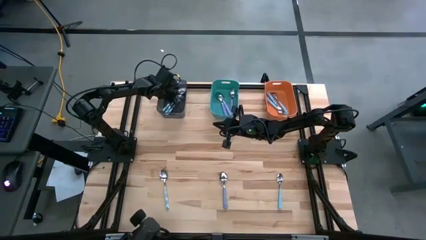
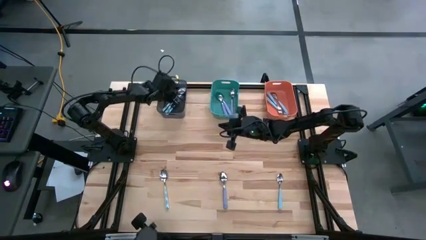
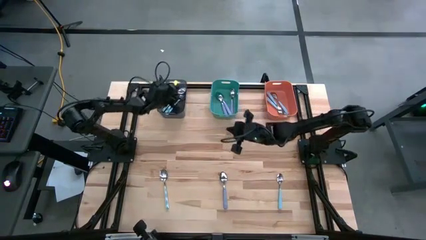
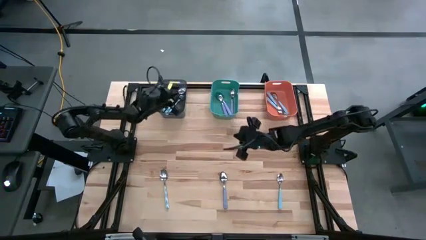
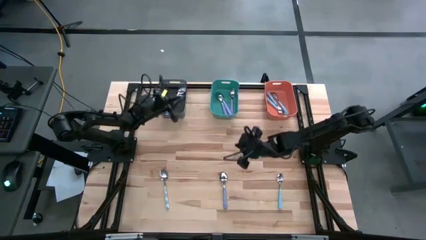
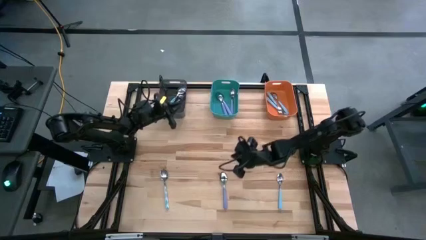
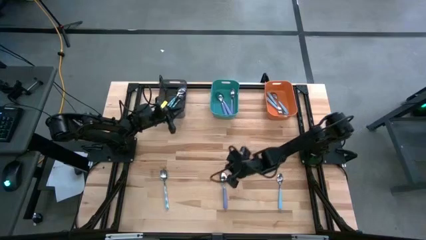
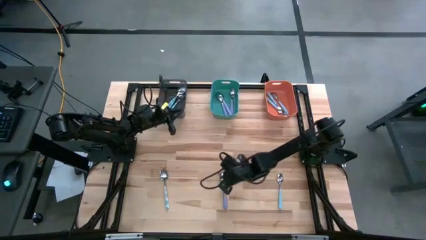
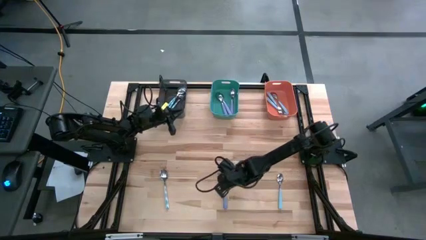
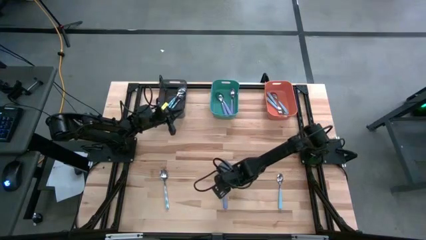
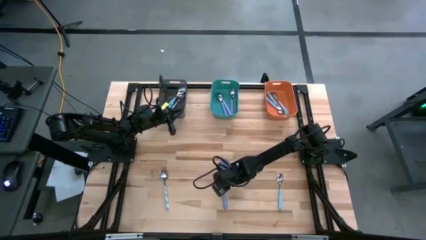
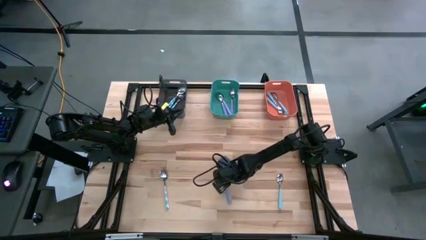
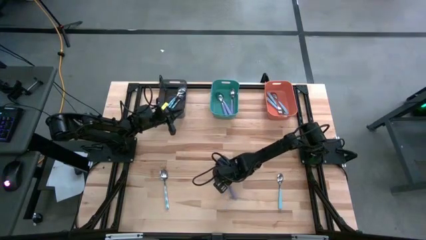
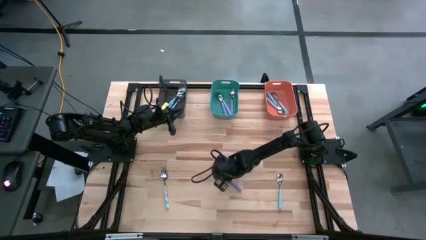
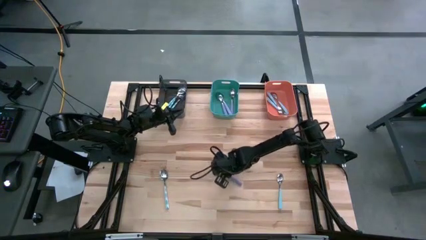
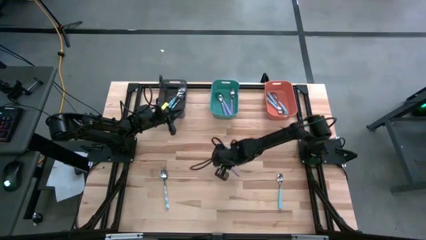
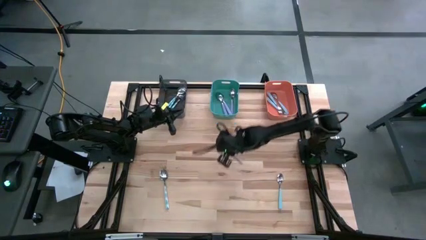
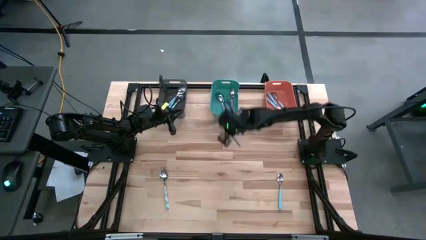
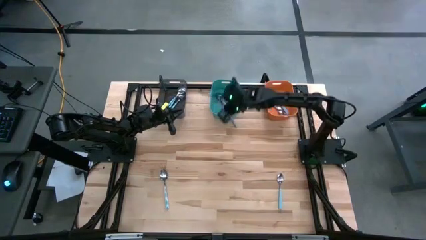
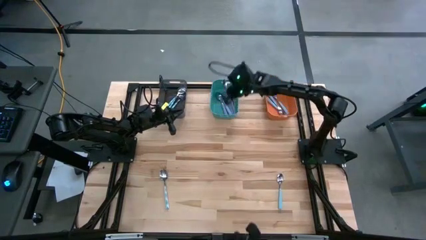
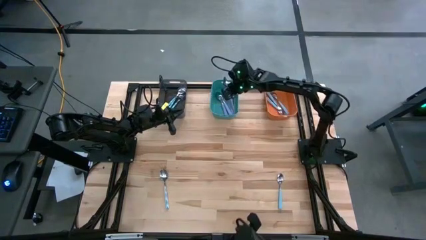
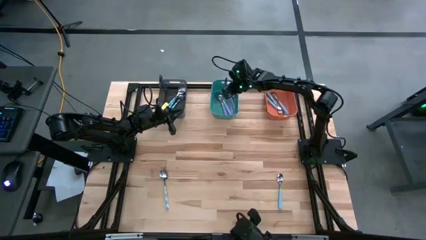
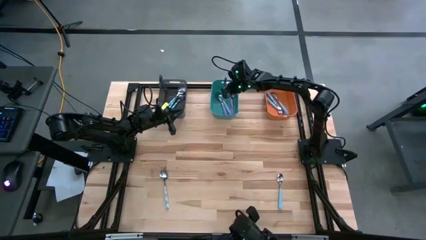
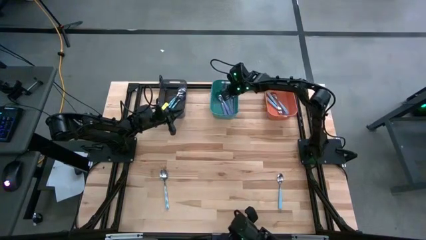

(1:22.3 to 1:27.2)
Task: Sort silverware by color (type)
Put the purple spoon into the green bin

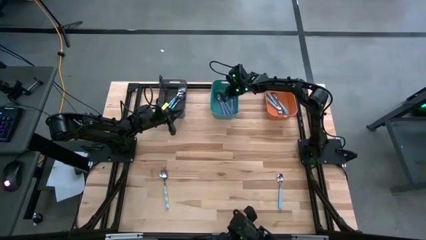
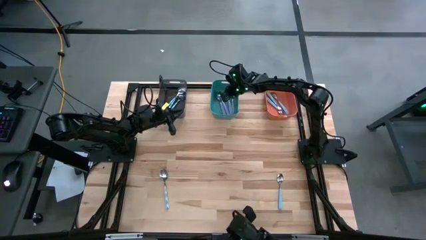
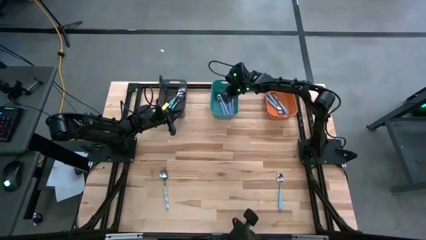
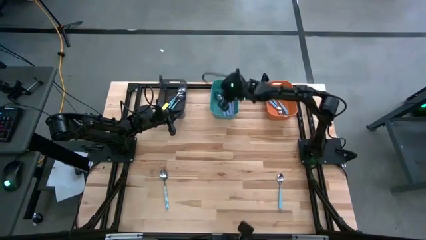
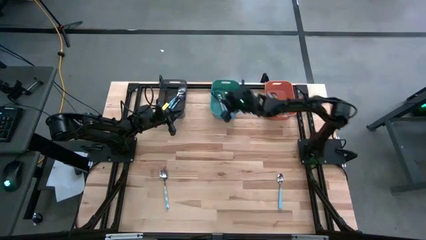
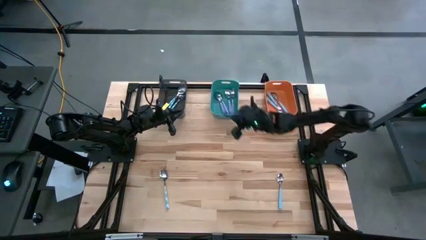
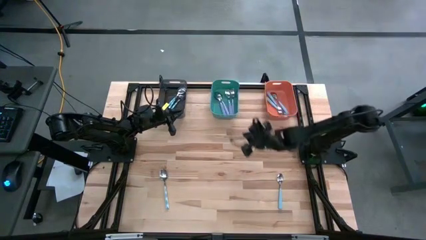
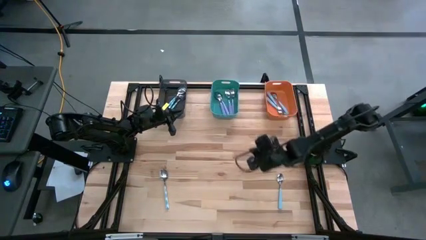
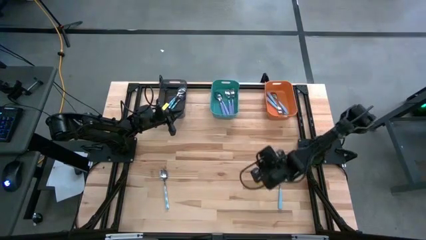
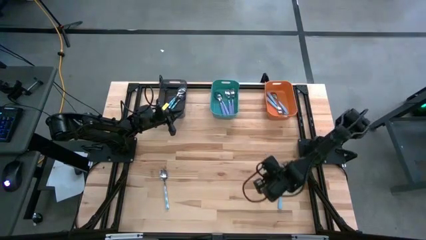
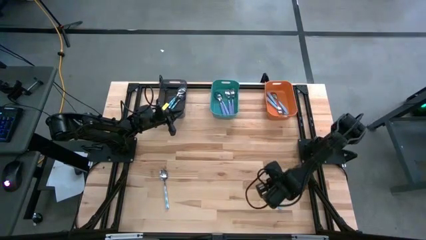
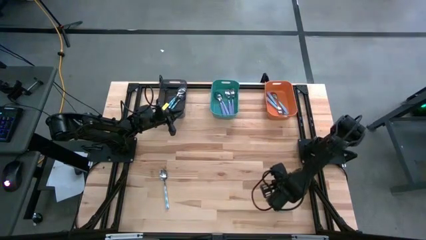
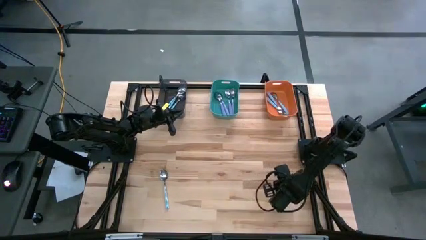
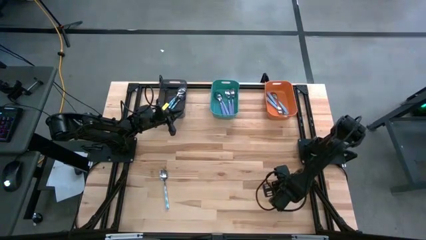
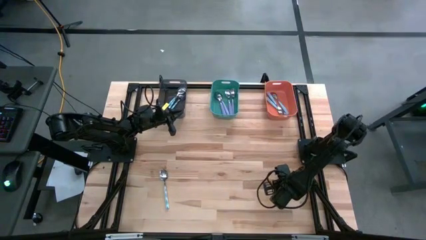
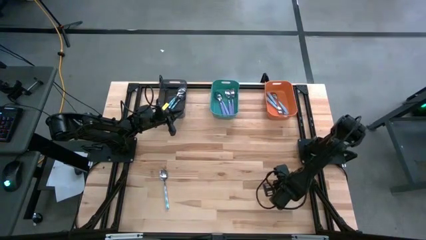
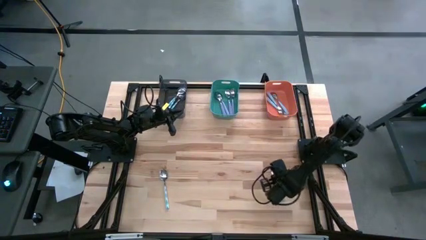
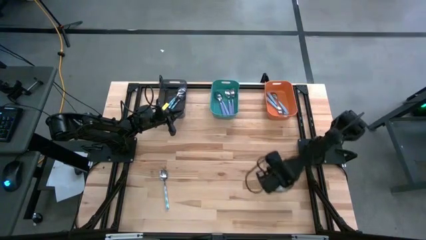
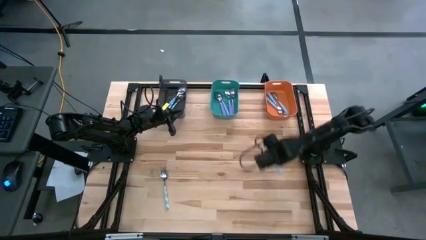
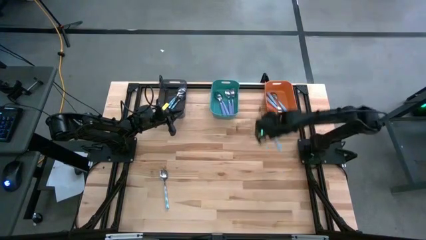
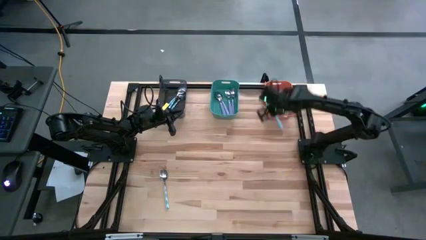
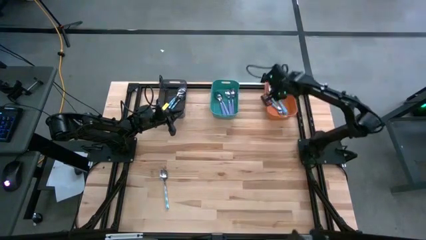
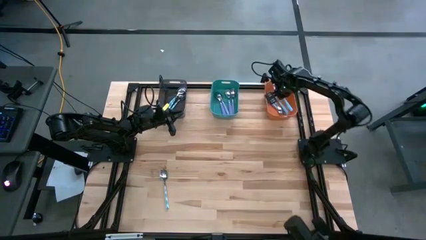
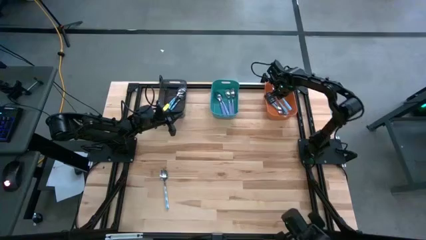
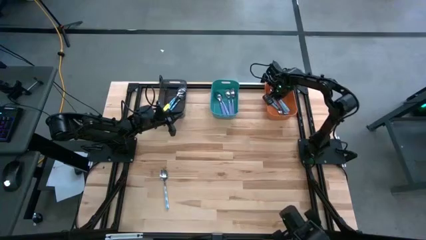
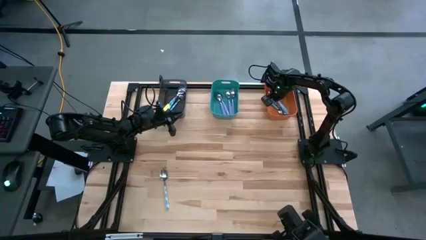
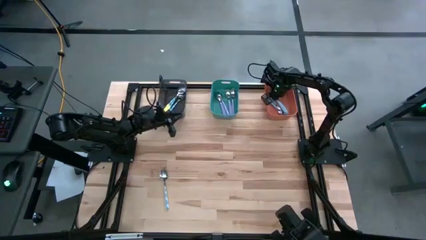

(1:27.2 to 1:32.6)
Put the blue spoon into the orange bin

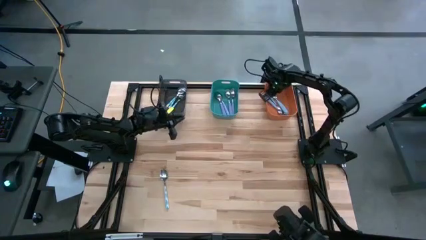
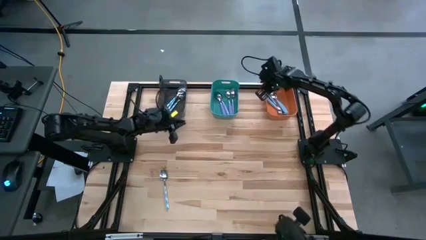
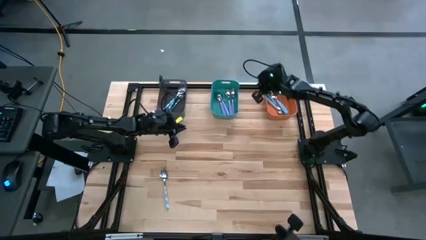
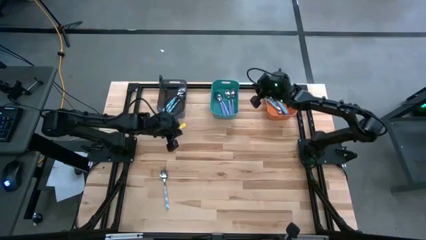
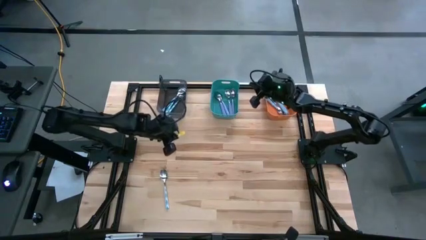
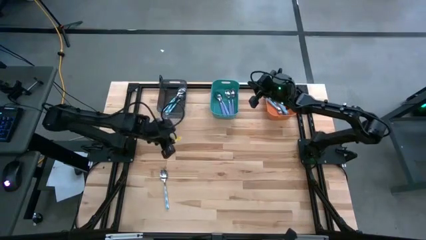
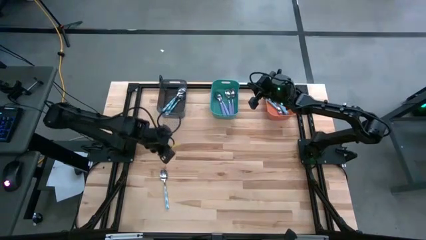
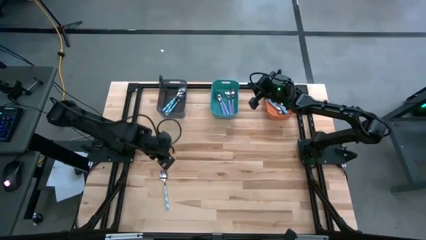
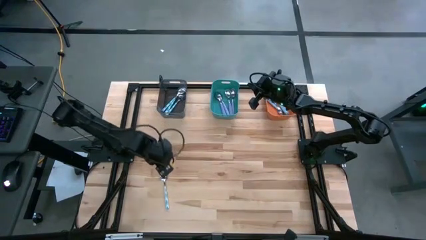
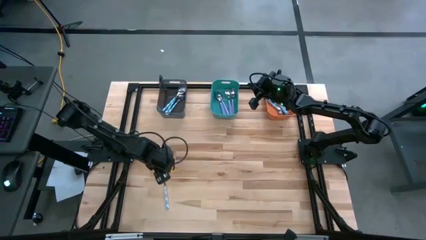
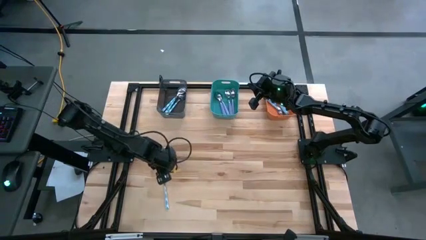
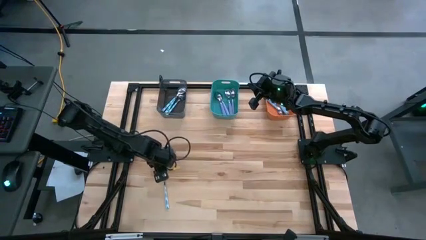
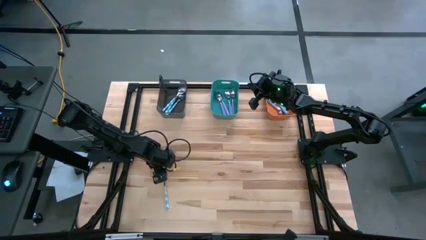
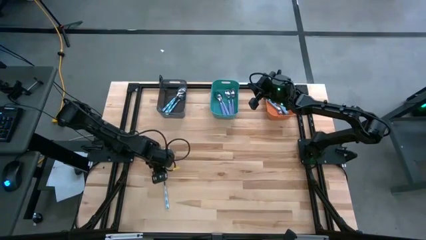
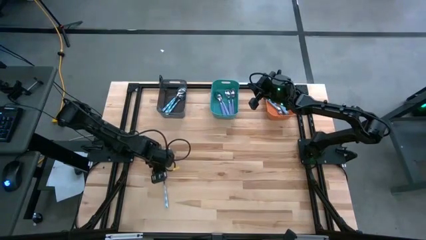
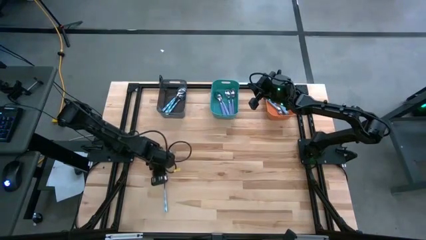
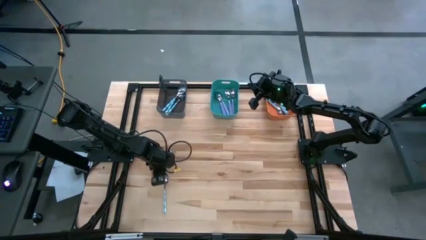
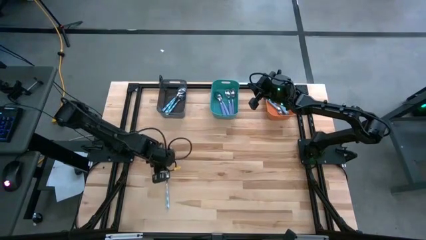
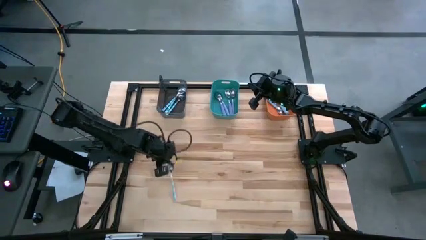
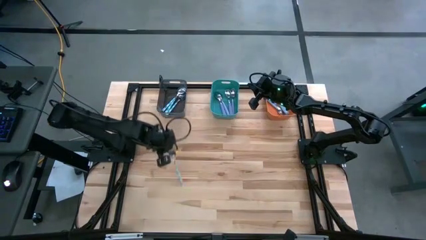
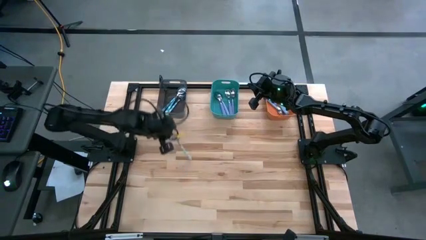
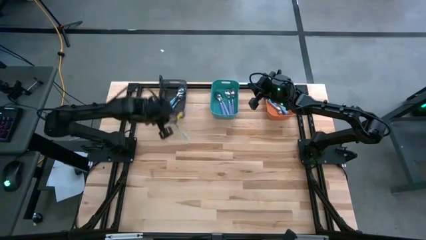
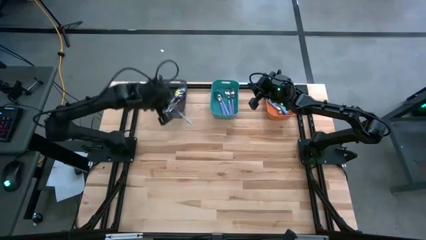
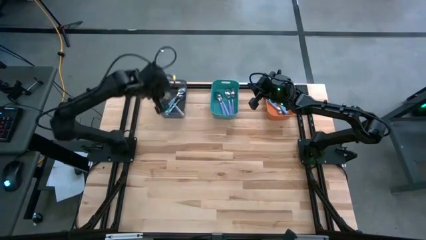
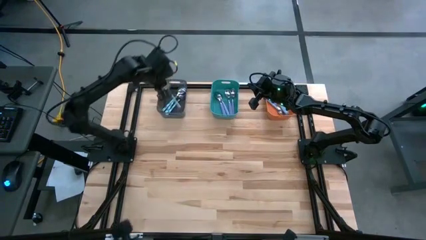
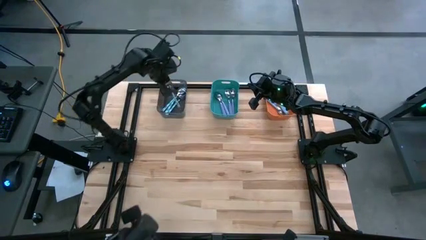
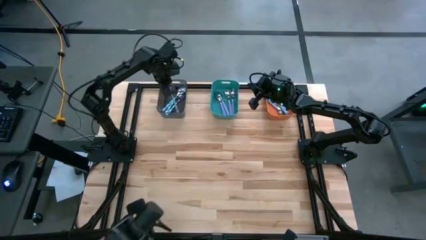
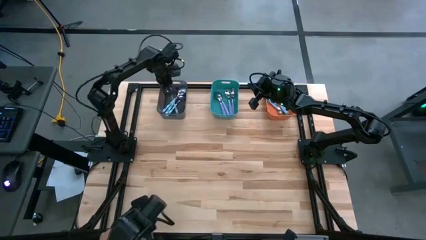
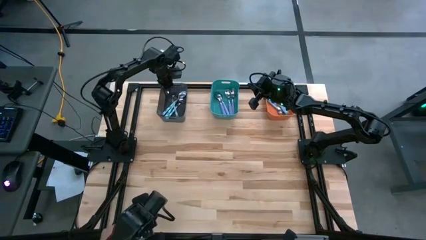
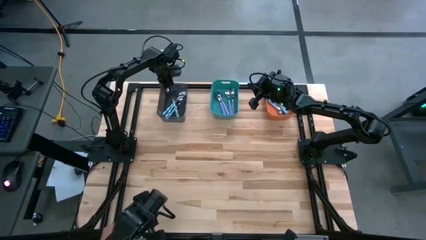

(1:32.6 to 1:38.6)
Put the white spoon into the black bin
